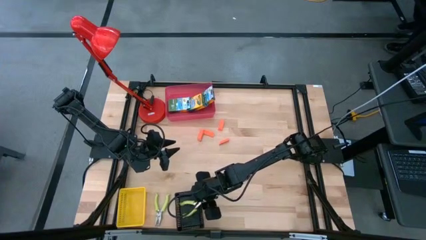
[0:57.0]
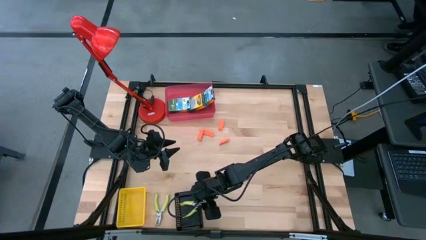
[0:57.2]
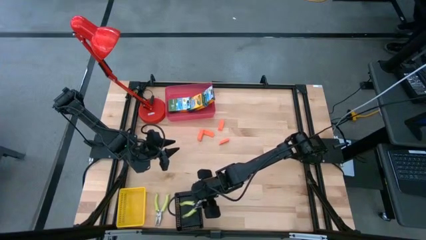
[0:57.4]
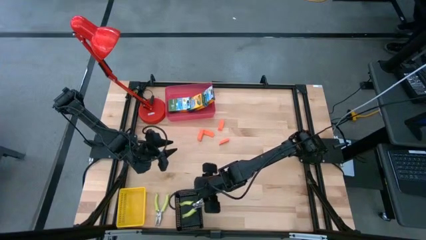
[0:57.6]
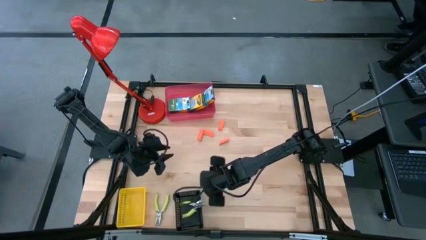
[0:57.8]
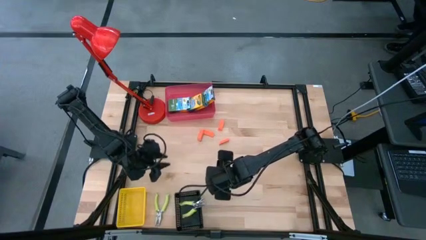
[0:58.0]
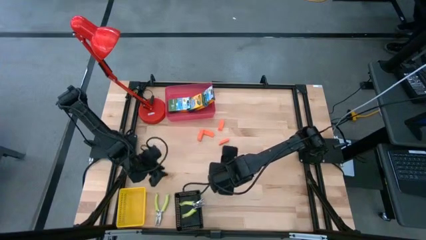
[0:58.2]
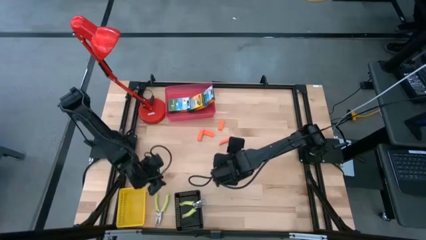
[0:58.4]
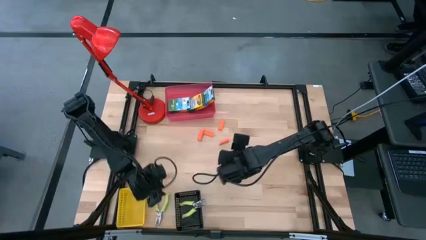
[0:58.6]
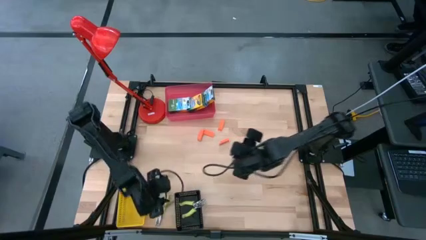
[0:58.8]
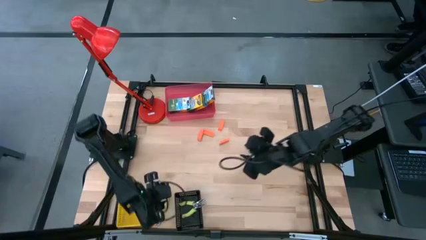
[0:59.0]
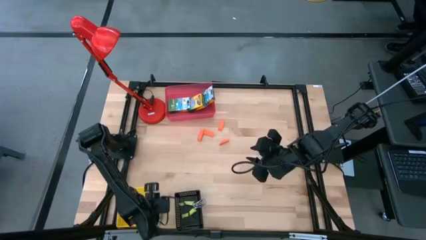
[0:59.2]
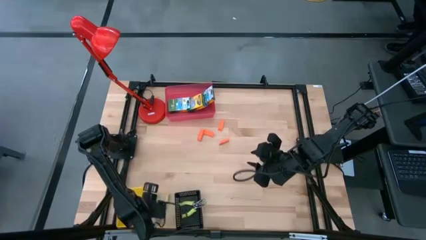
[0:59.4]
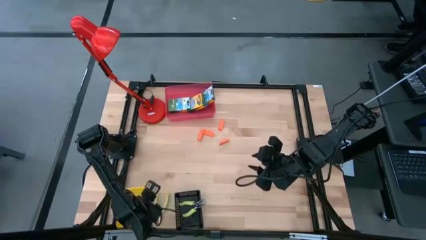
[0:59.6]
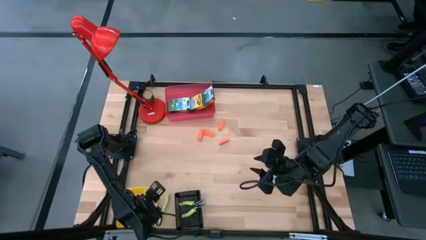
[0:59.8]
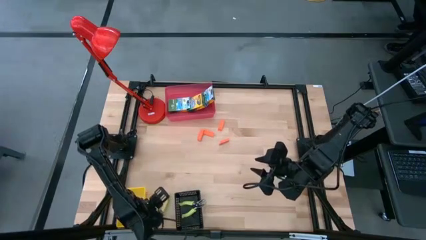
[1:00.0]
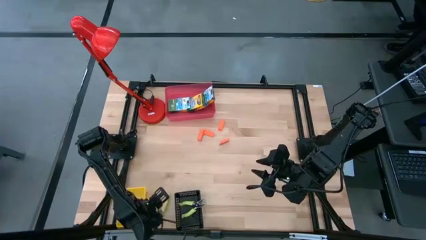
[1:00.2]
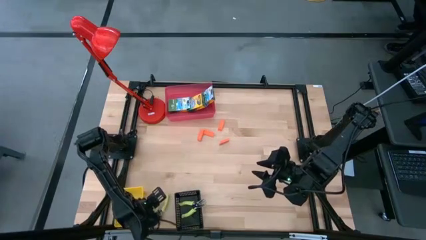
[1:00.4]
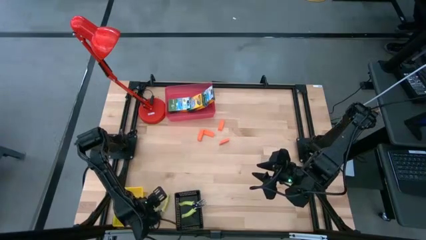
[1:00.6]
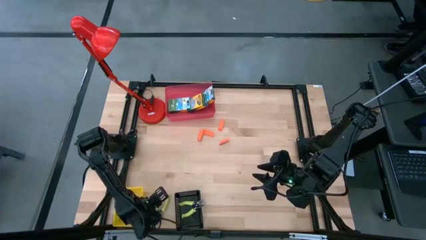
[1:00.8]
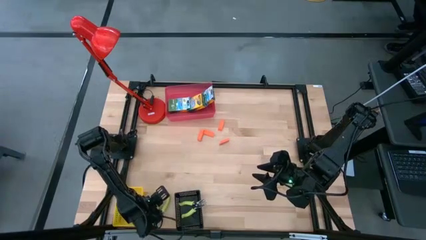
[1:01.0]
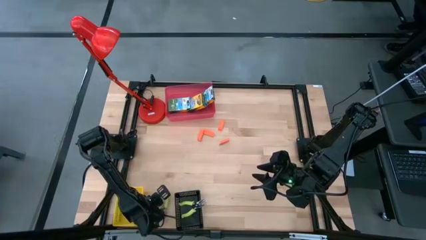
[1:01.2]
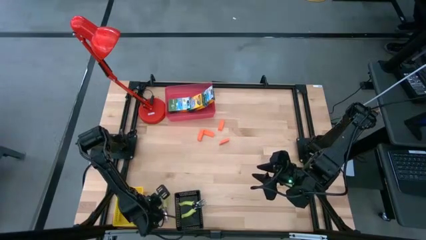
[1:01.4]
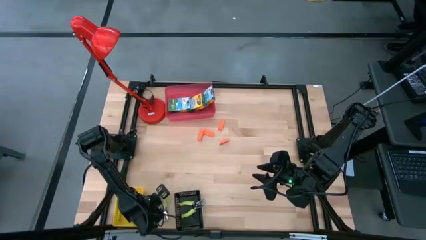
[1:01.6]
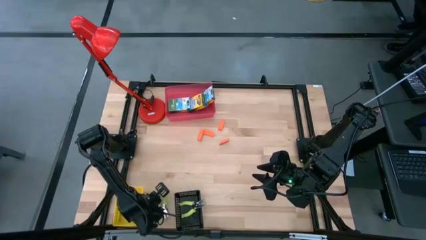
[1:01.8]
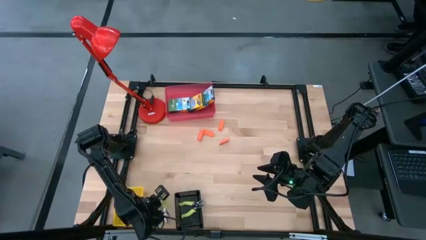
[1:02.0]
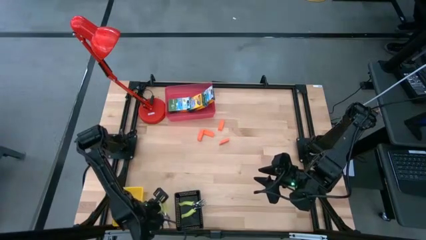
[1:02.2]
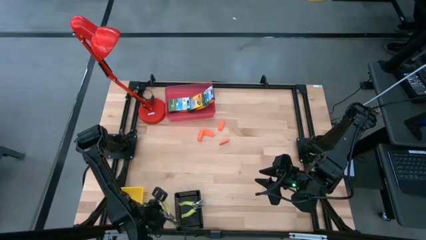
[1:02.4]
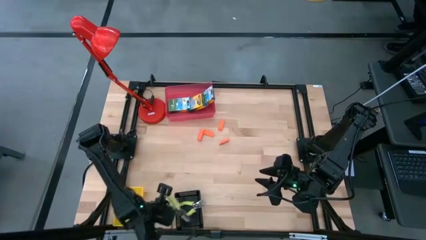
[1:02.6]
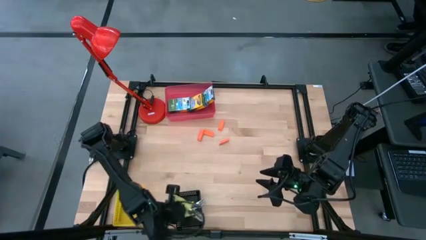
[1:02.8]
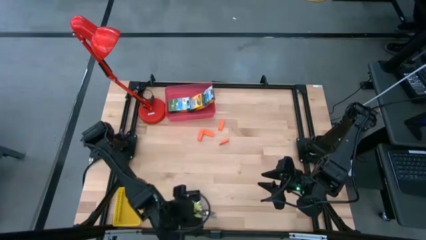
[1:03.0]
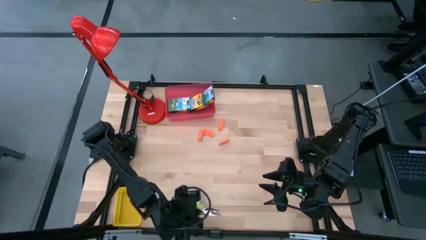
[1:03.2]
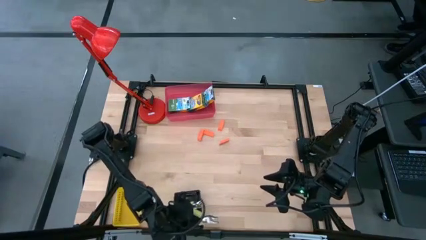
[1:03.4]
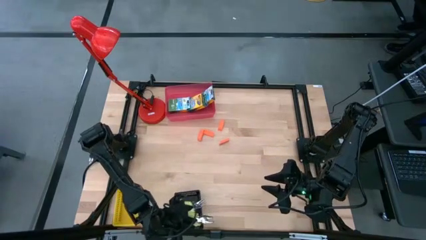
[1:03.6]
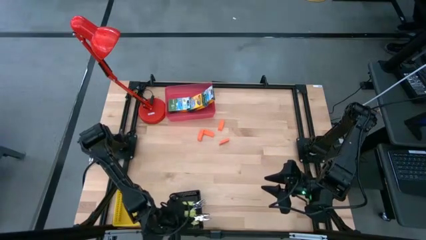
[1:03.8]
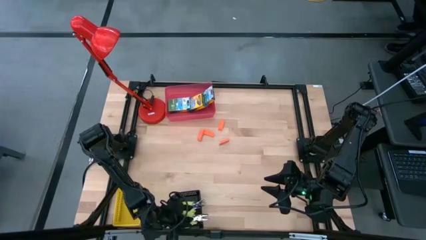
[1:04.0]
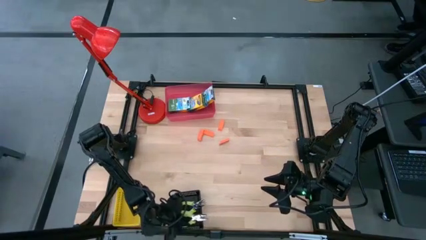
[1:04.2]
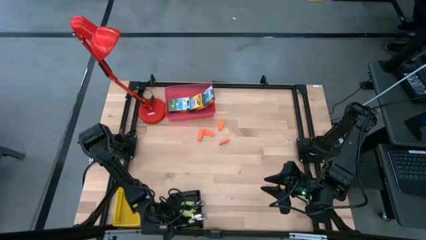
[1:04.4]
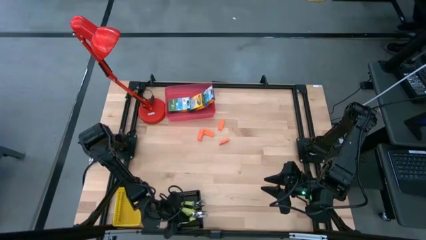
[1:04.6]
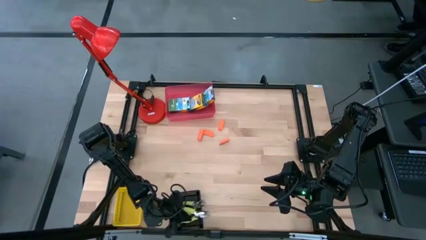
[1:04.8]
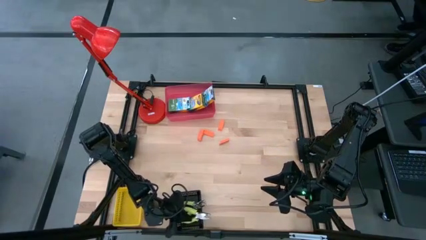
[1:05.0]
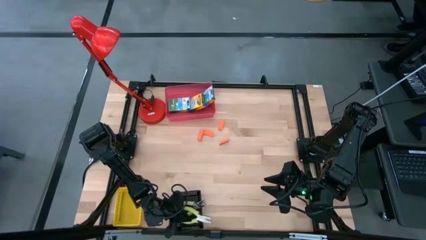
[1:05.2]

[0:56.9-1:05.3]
Task: Pick & Place School Supplies
Put the green hole puncher into the black bin

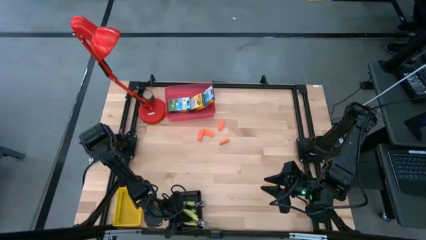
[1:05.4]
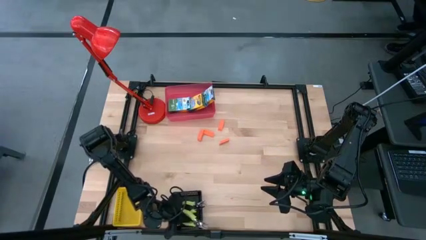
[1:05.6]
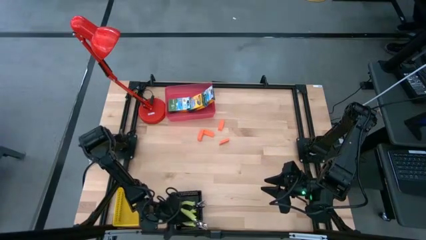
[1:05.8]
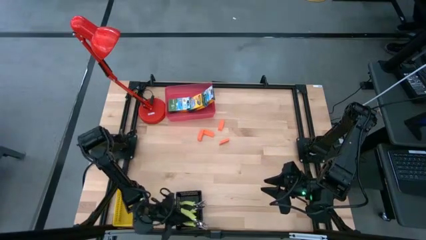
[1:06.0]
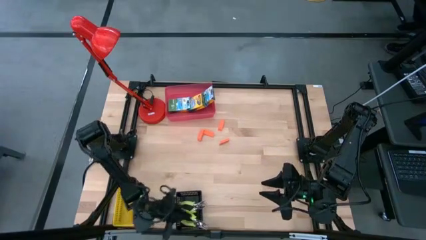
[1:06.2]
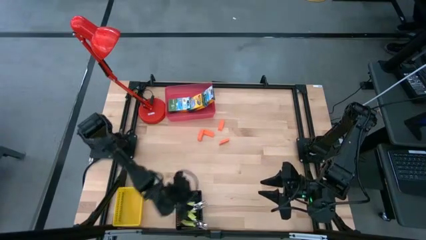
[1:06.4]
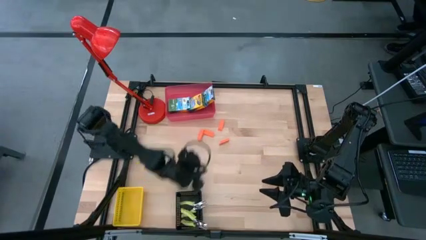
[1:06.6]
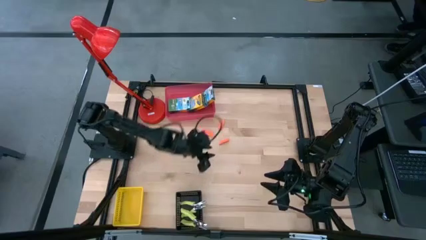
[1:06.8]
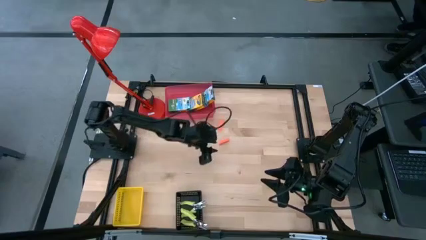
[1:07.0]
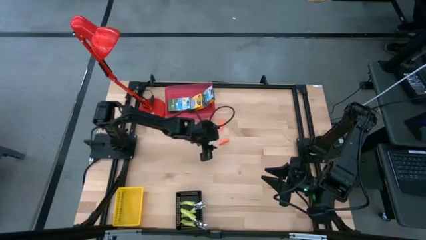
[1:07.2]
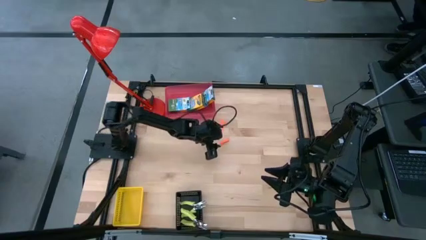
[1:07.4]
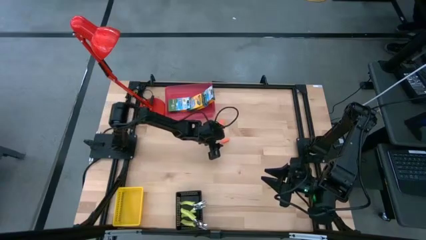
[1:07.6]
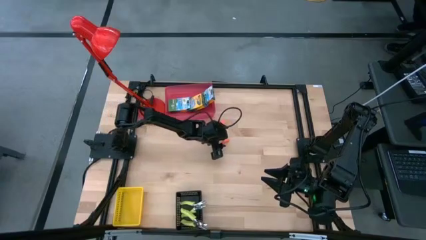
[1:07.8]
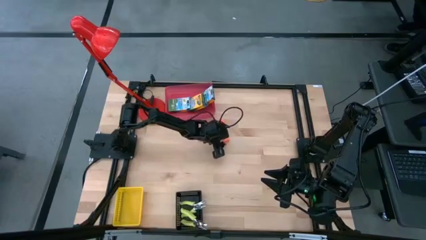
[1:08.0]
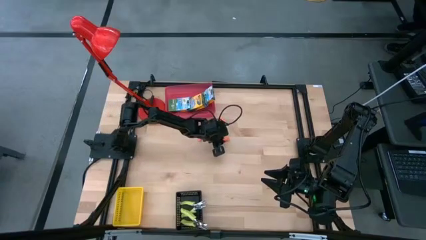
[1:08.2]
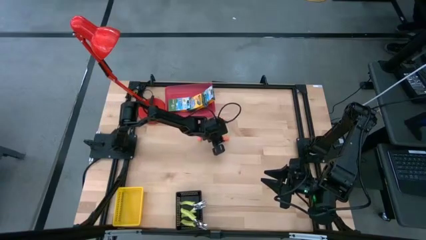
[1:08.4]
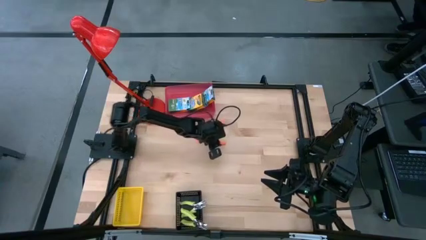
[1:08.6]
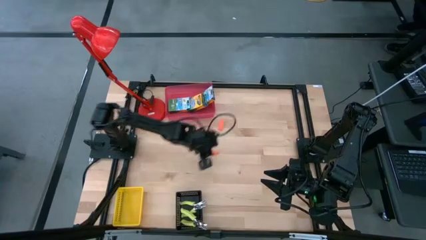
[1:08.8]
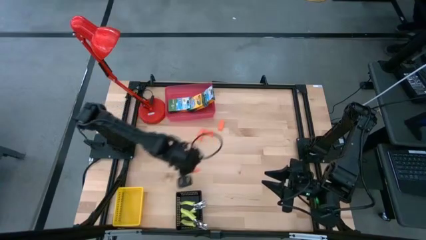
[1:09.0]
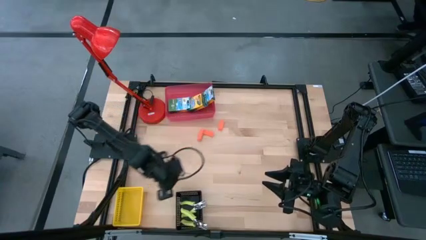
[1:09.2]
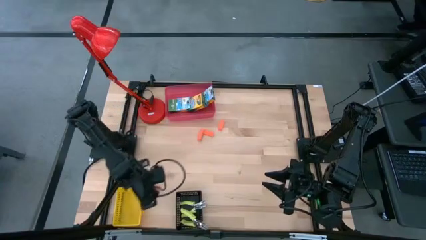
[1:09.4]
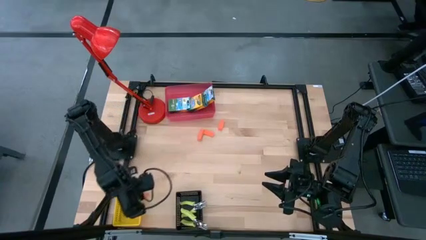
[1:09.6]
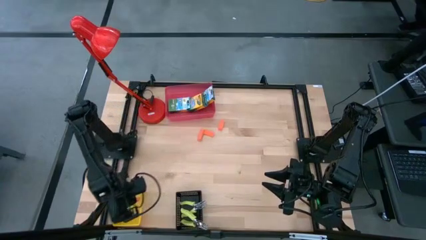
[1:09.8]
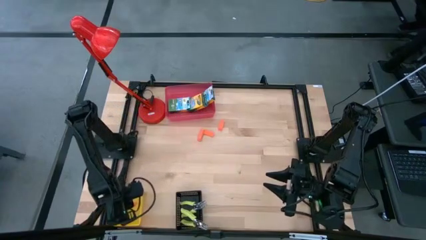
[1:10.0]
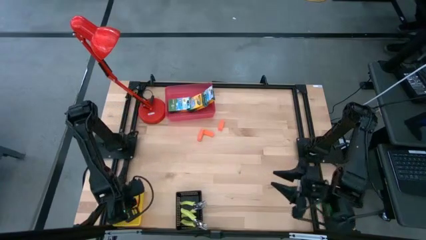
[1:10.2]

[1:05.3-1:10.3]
Put the orange eraser into the yellow bin

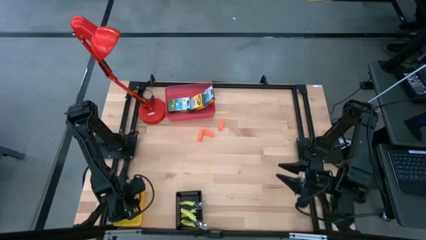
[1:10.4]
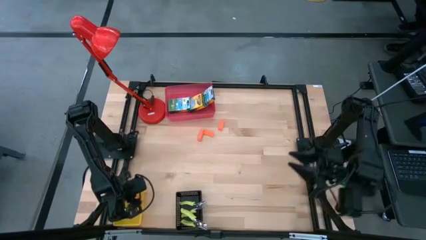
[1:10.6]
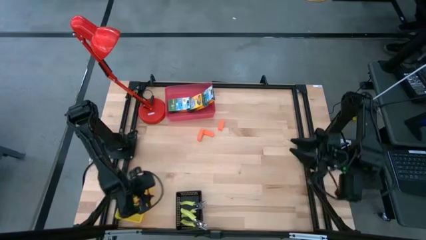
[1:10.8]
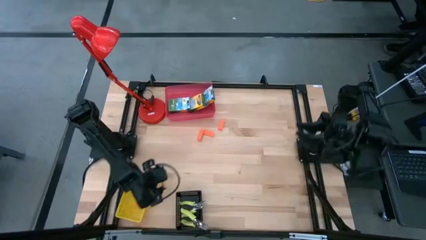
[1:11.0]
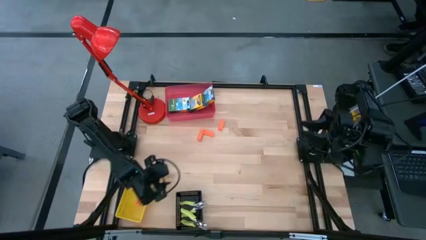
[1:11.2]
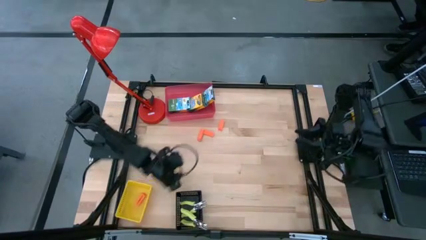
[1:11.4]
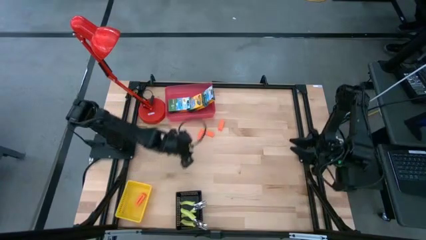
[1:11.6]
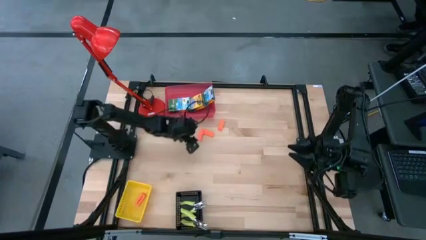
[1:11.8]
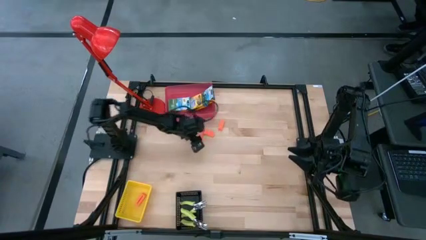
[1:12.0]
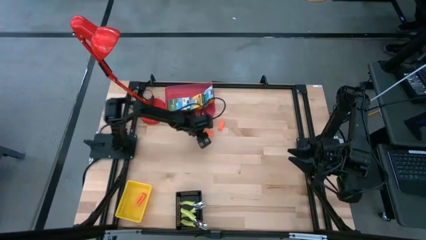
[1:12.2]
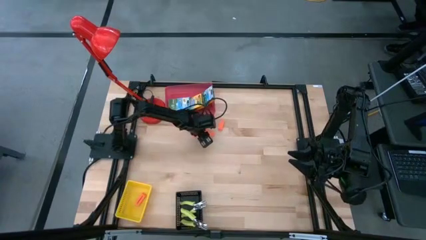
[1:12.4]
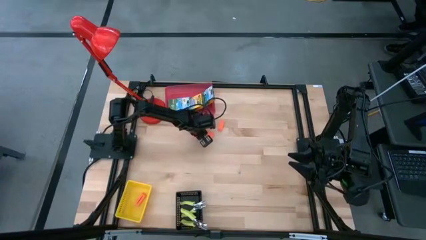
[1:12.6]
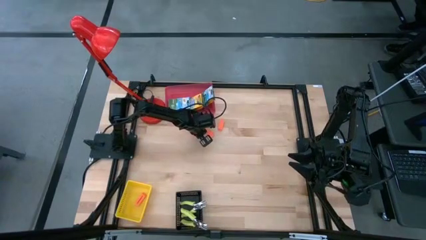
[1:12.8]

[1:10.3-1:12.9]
Put the orange eraser into the yellow bin
